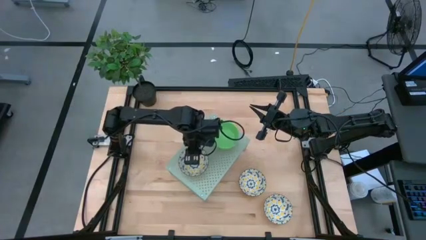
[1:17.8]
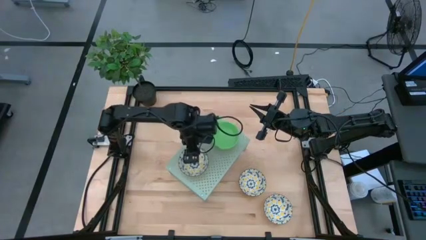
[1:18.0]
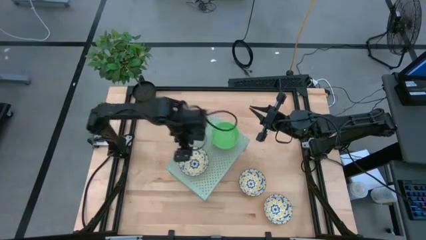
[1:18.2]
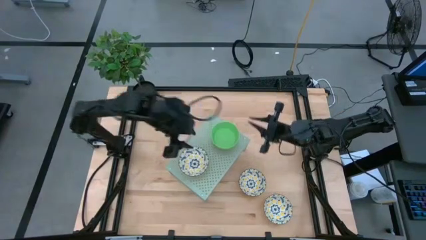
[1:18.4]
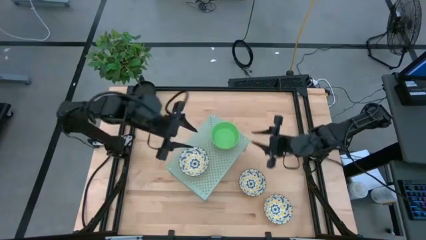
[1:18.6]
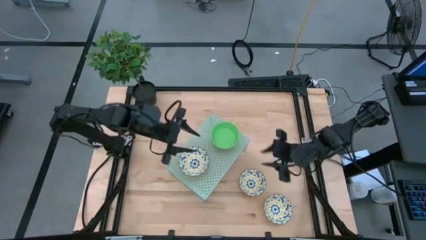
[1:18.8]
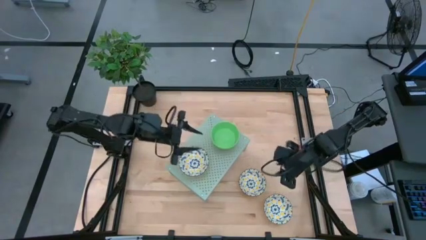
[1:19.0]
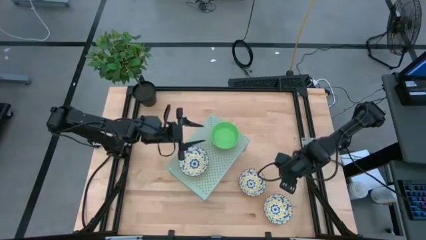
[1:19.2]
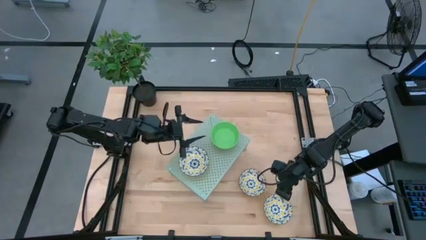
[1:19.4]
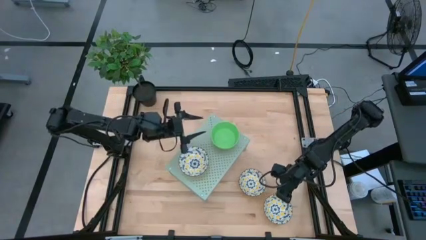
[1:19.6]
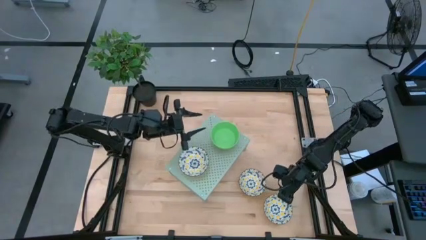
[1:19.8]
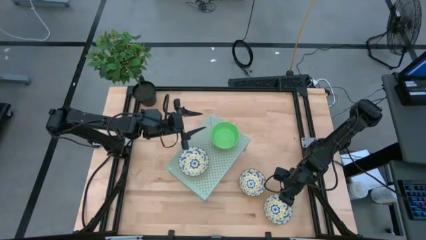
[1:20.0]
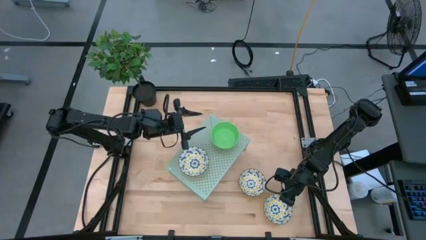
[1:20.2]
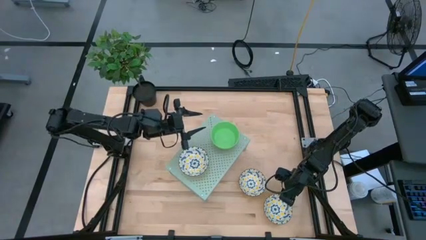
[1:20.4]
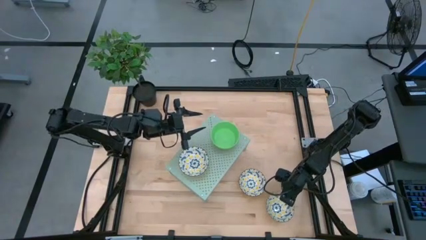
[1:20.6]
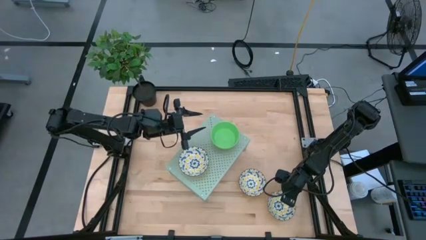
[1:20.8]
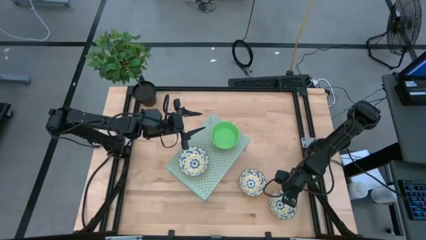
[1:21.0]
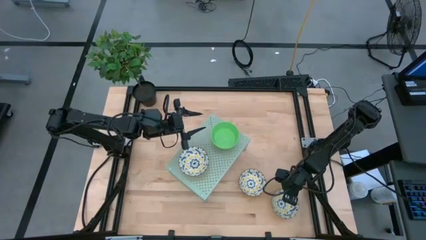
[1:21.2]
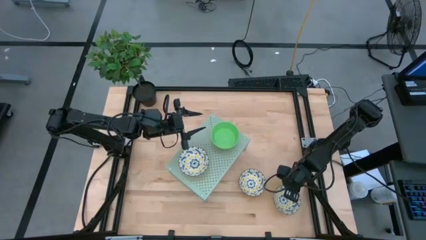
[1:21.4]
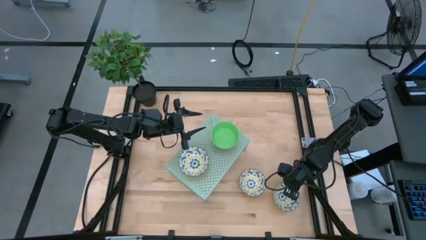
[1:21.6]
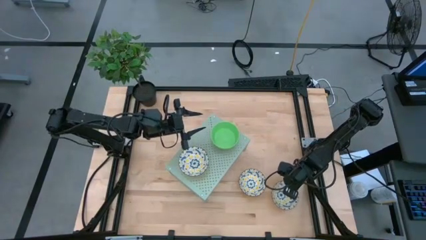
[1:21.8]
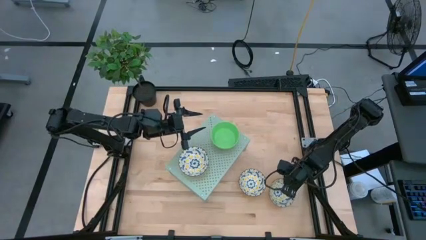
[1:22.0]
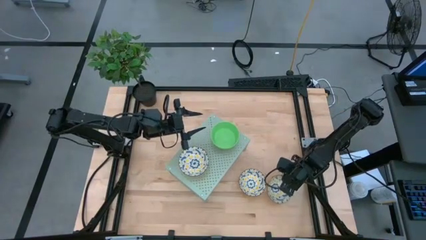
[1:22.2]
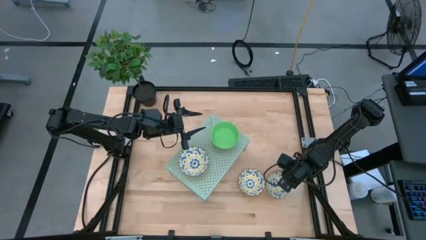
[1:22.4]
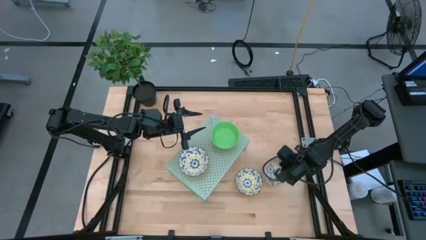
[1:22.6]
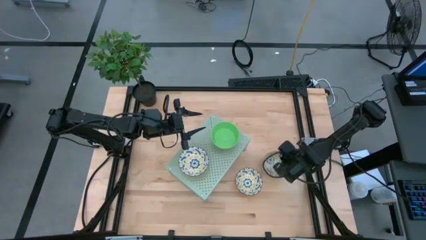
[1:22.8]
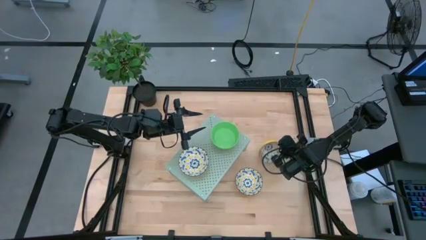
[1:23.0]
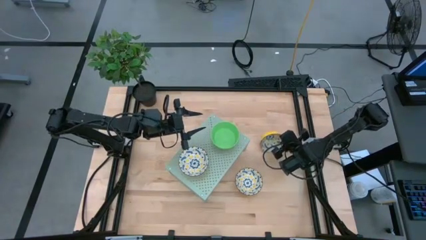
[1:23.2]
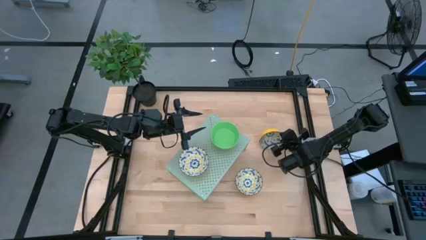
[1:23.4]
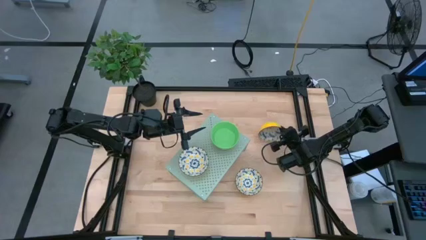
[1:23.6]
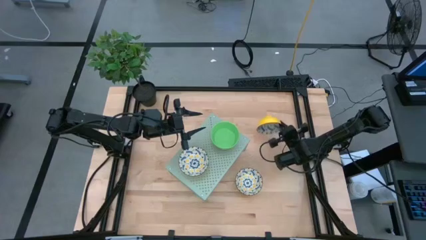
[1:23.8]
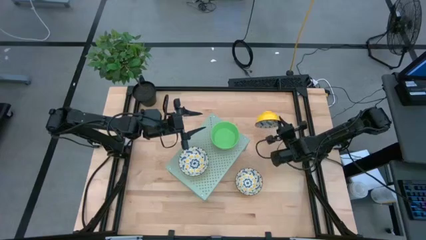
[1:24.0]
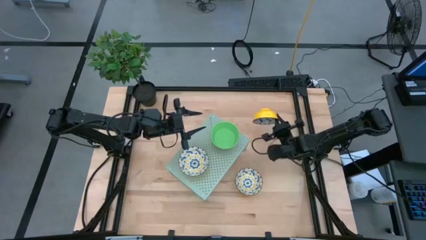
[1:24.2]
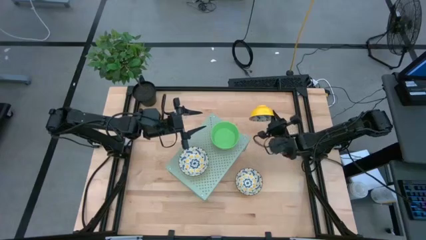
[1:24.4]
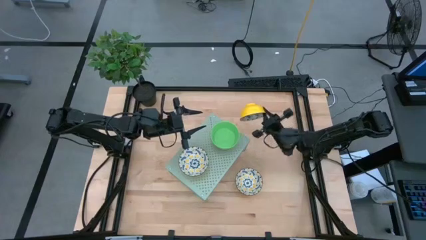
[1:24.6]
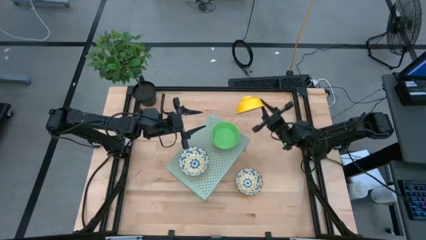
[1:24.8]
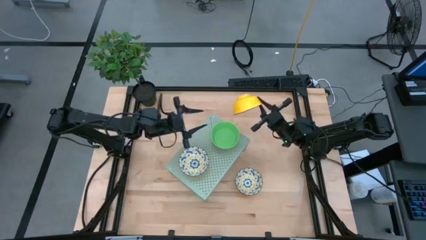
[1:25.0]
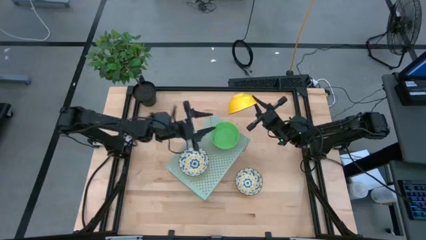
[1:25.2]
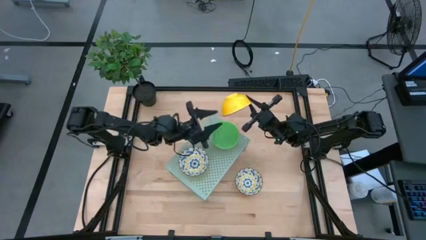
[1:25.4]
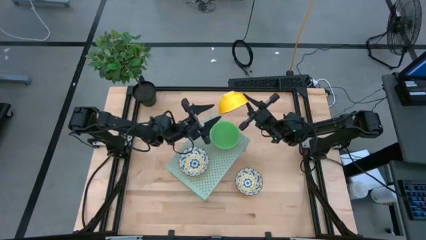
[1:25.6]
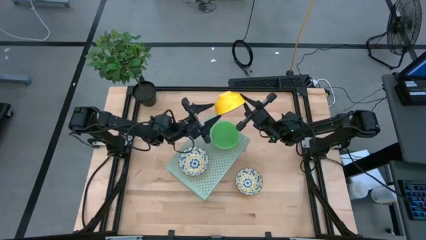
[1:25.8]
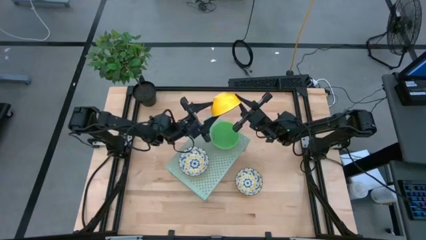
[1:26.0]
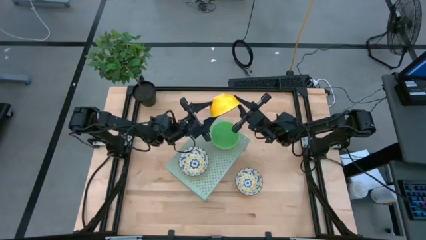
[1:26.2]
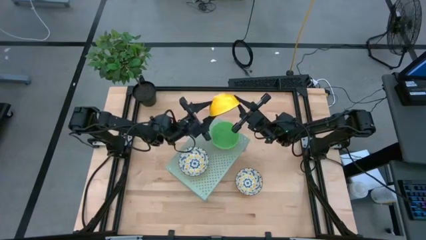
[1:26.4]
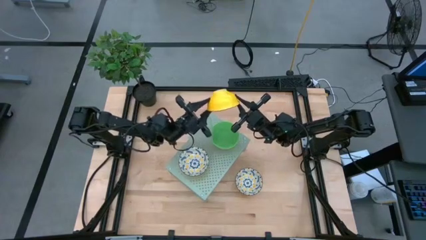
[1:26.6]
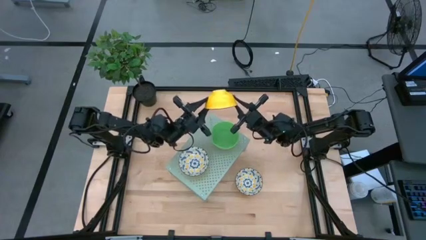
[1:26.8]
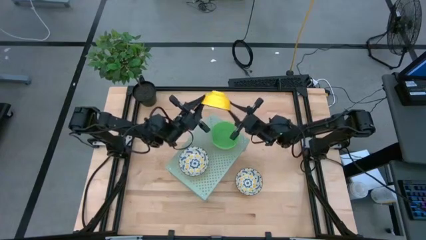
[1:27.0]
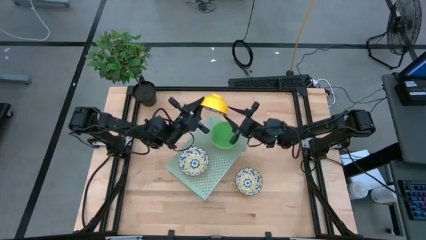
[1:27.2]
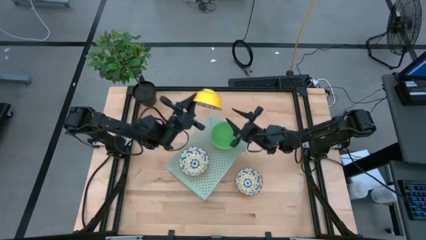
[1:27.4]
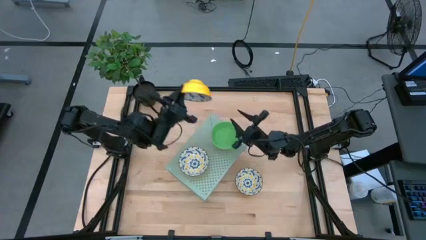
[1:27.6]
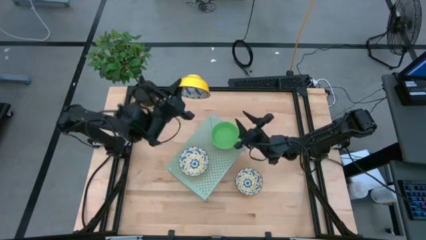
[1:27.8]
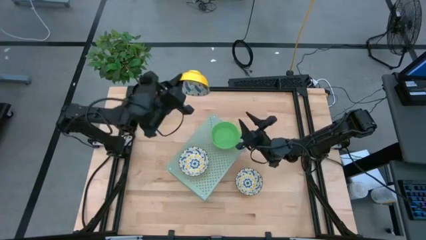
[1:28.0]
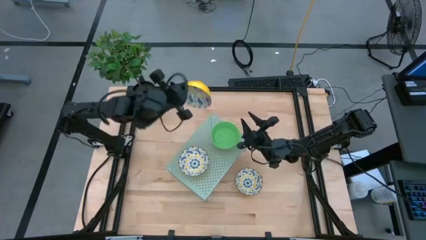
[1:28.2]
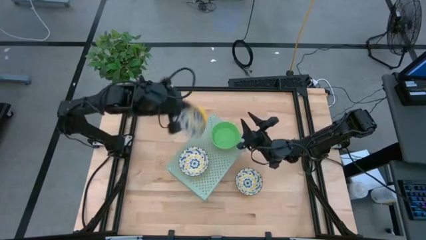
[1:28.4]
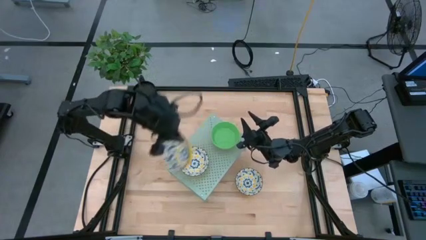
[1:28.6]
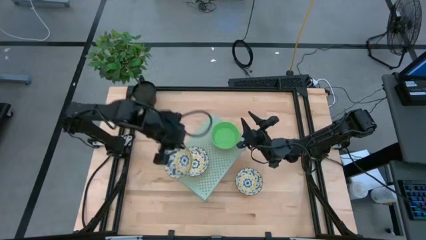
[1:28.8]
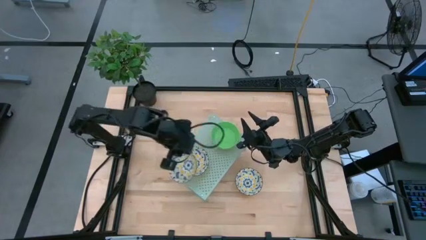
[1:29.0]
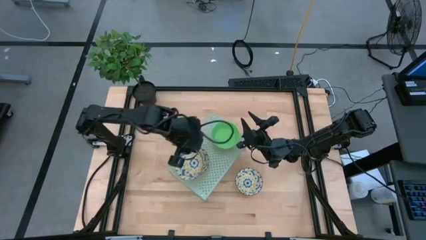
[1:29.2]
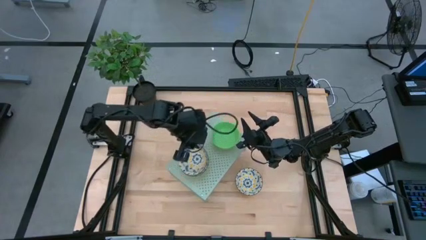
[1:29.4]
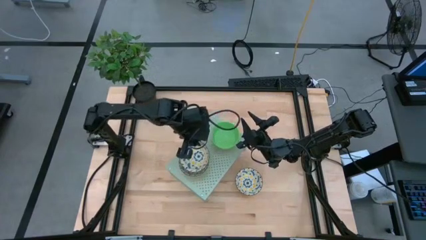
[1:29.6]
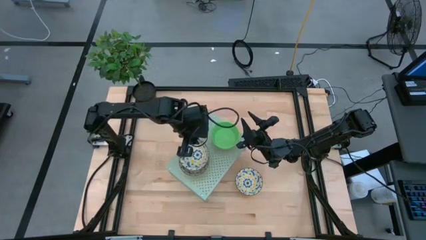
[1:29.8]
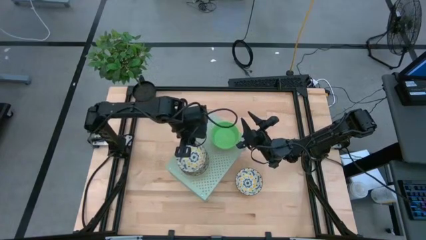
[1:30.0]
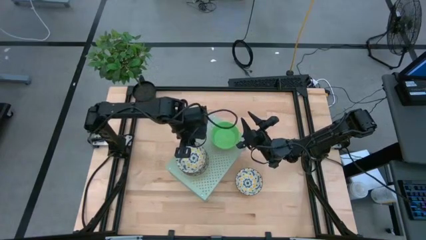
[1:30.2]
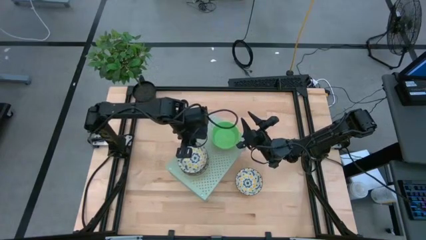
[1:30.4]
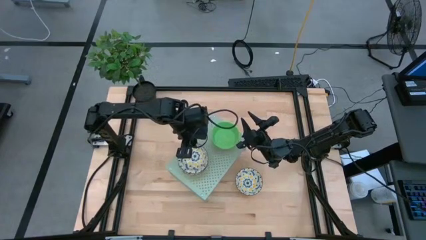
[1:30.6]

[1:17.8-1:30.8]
Task: Pick & Place Mini bowls
Stack the bottom patterned bowl on the patterned bowl on the shelf

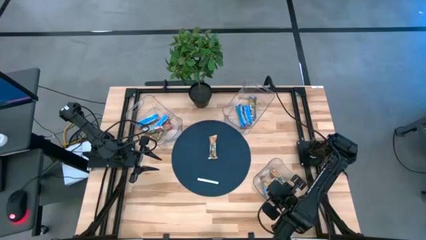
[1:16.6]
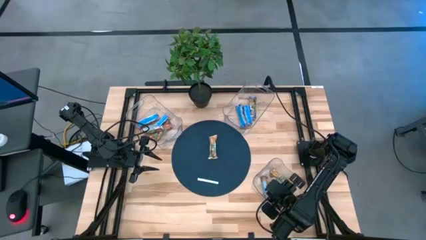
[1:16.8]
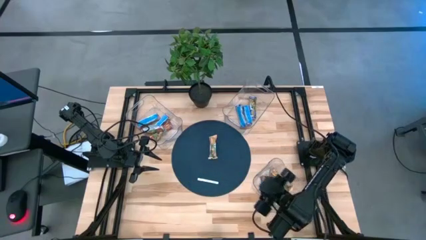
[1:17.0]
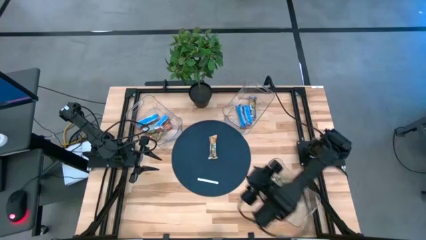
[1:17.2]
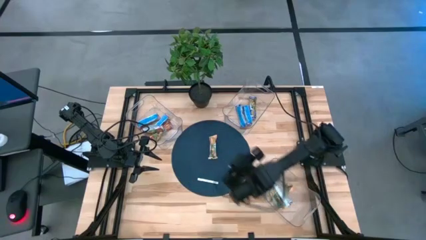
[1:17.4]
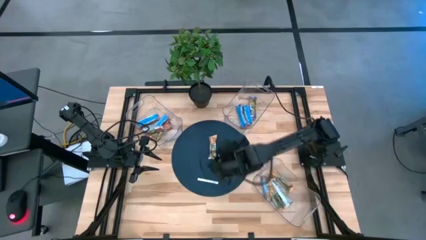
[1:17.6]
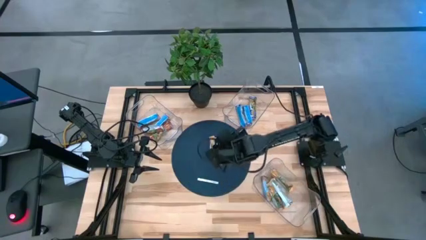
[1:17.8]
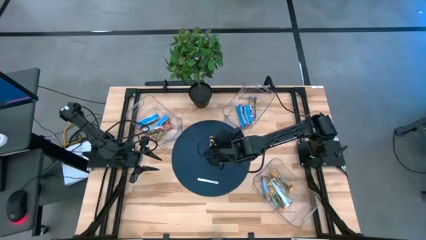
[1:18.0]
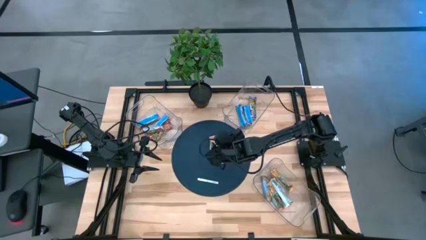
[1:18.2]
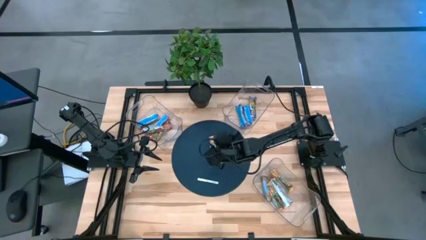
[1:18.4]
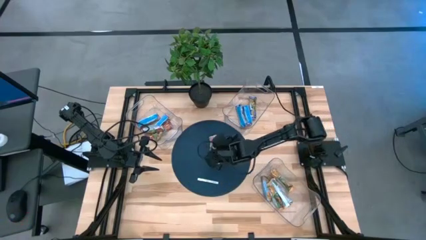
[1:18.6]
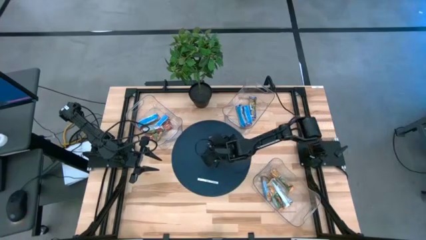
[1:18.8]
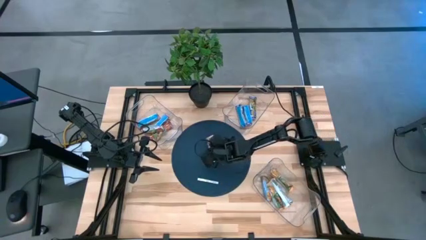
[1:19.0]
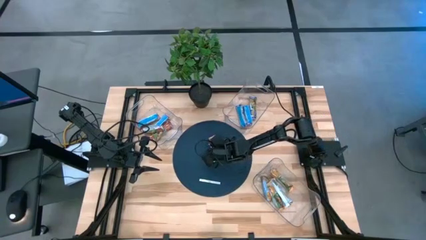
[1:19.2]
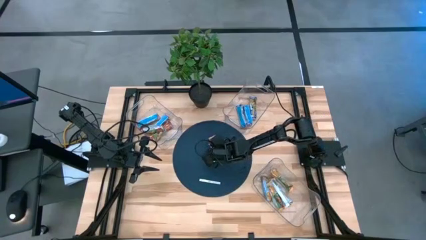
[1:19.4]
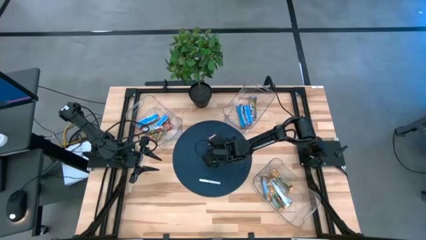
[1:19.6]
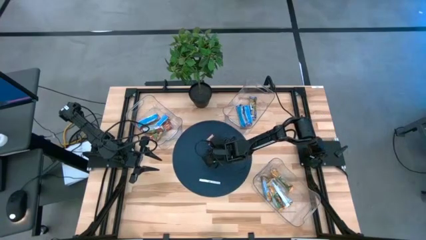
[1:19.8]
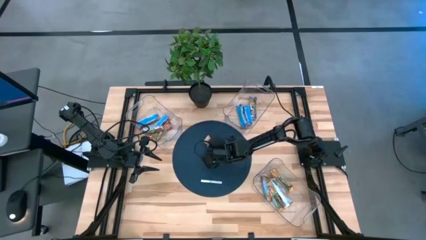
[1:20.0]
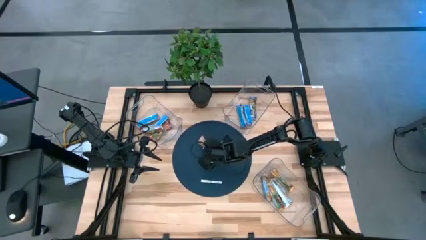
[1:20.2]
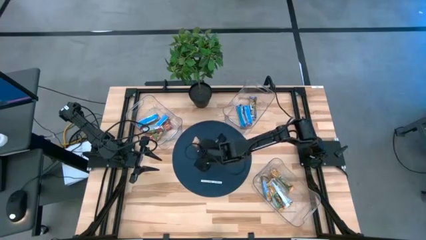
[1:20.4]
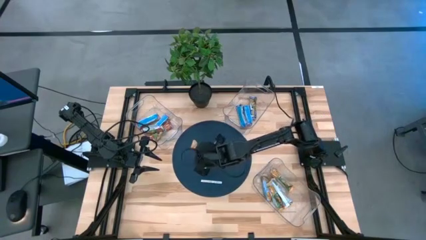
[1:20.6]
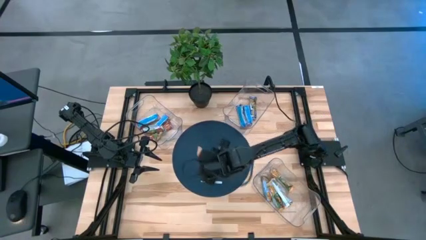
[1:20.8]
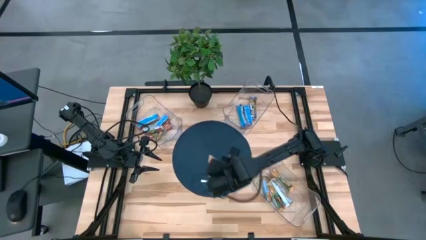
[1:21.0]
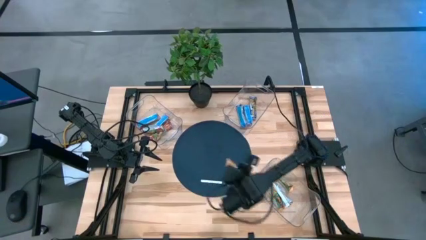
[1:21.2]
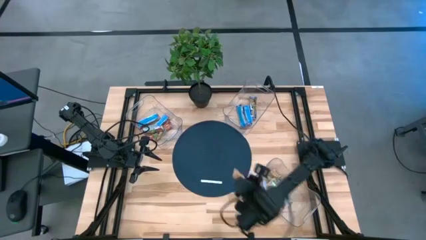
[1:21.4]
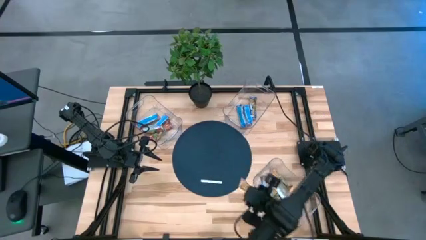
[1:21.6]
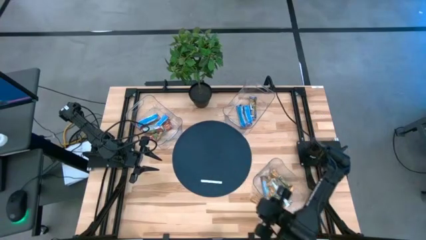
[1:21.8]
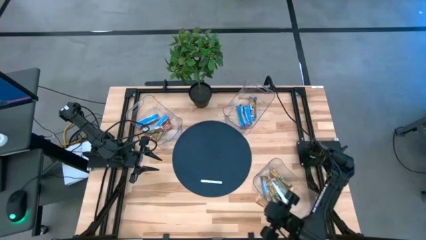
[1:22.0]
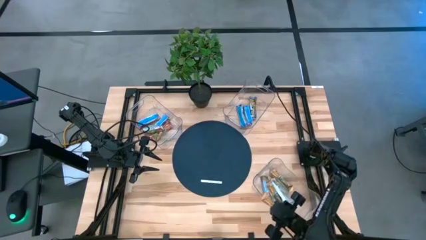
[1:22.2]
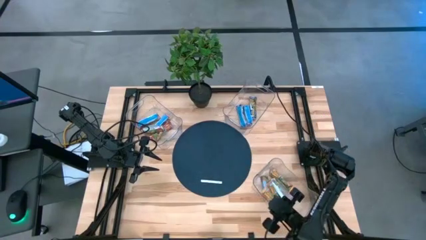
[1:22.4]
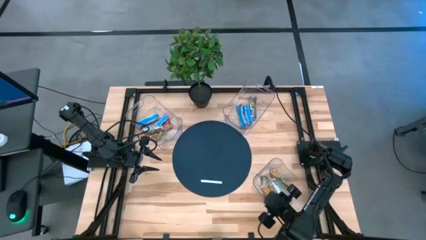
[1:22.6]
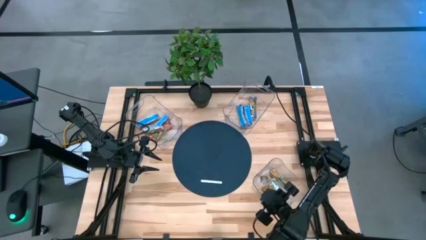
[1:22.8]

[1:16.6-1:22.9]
Task: Pick and place Granola Bars by type
Put the yellow granola bar into the bottom transparent bin
